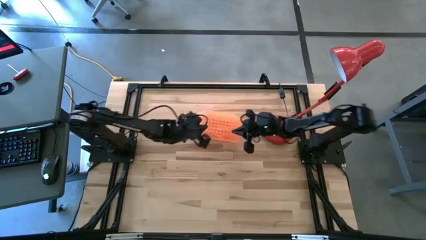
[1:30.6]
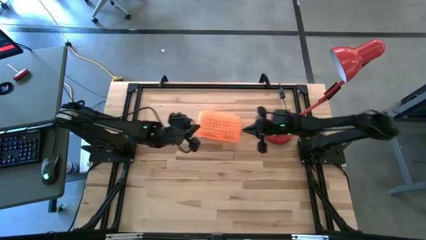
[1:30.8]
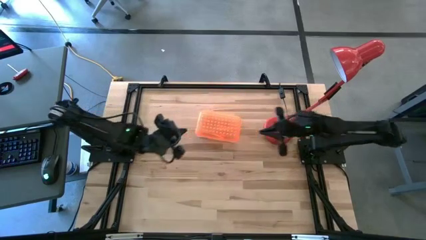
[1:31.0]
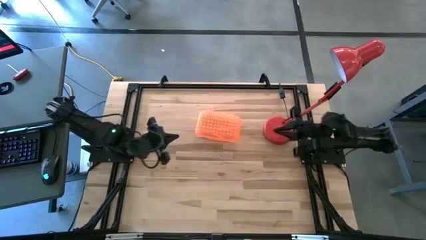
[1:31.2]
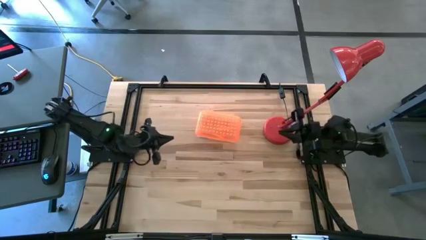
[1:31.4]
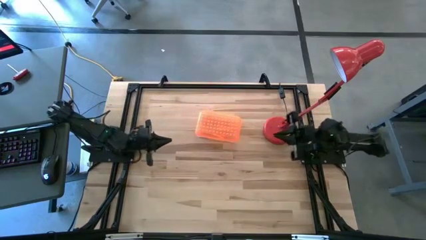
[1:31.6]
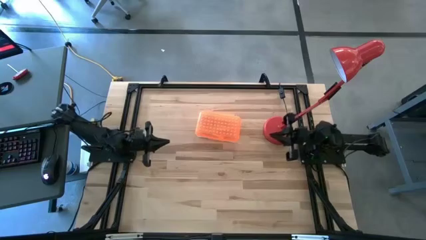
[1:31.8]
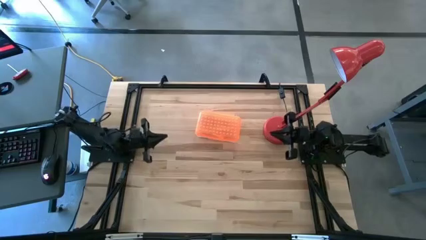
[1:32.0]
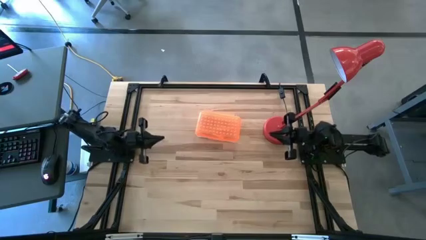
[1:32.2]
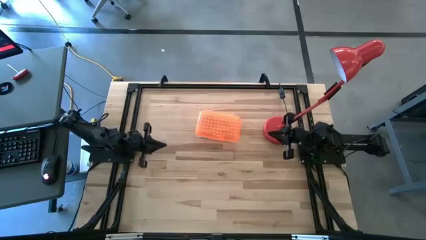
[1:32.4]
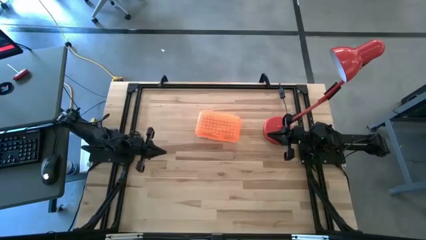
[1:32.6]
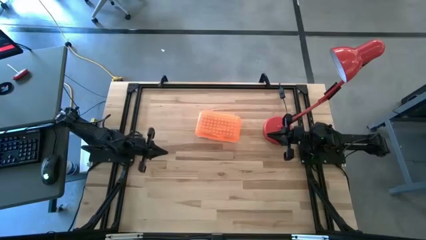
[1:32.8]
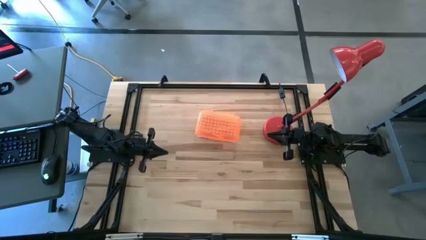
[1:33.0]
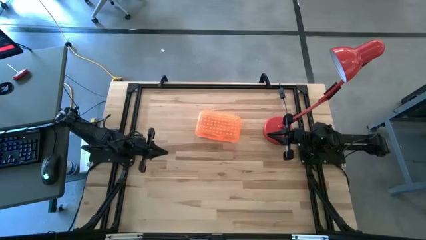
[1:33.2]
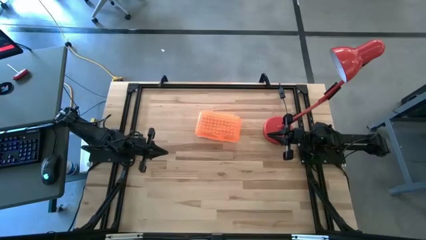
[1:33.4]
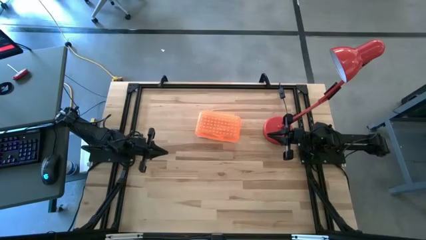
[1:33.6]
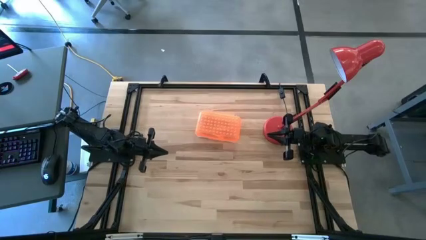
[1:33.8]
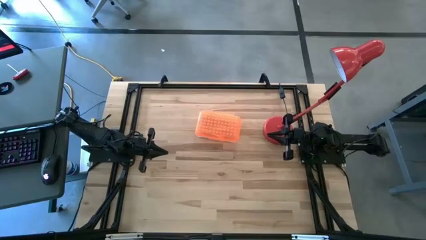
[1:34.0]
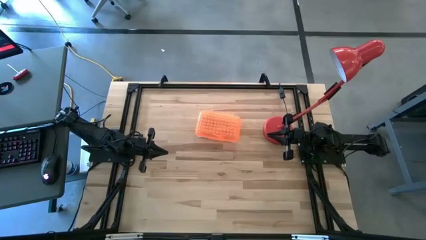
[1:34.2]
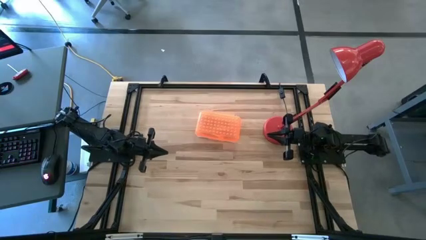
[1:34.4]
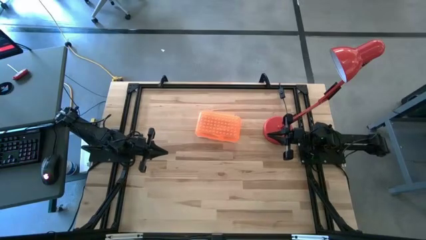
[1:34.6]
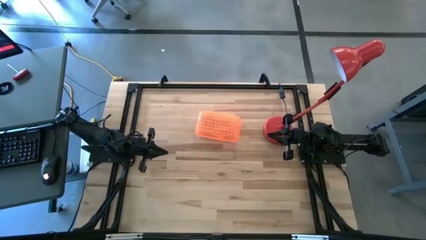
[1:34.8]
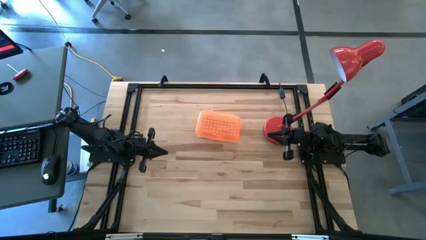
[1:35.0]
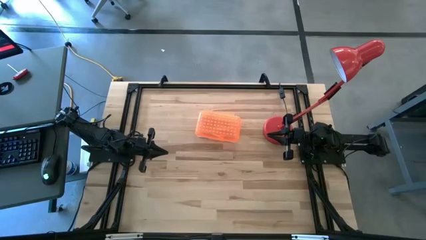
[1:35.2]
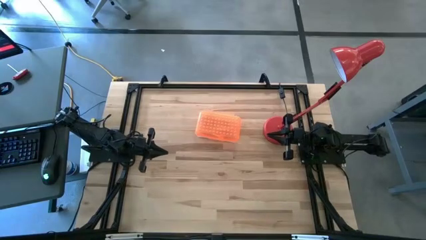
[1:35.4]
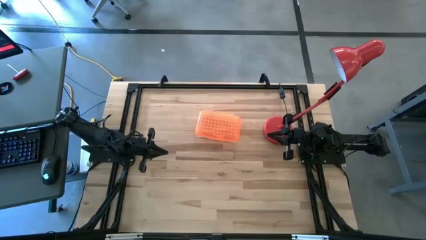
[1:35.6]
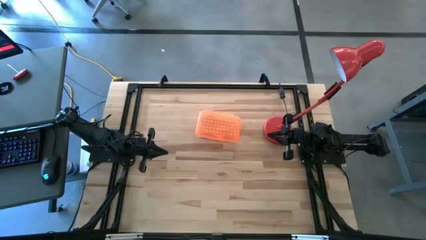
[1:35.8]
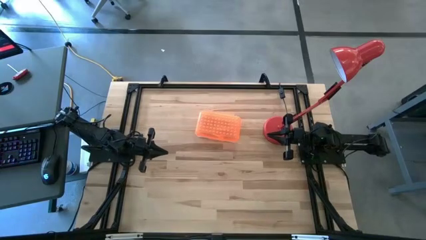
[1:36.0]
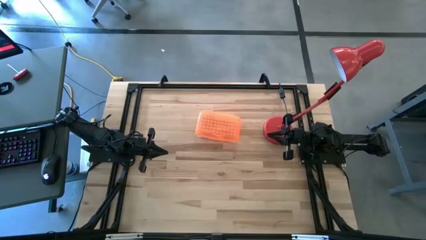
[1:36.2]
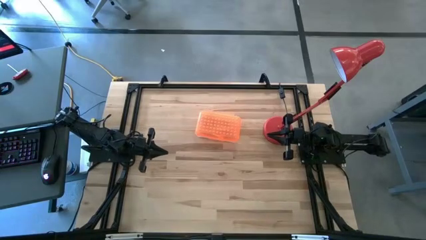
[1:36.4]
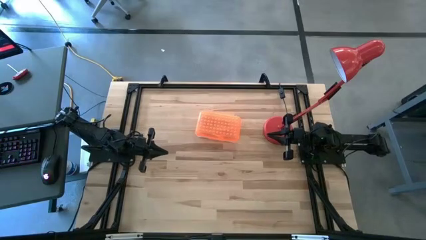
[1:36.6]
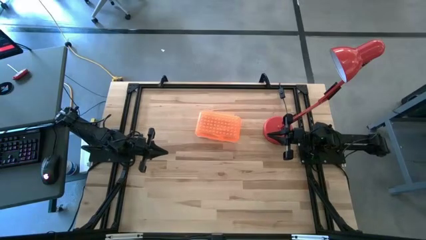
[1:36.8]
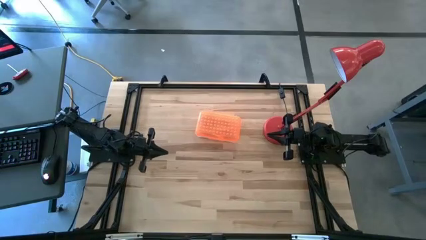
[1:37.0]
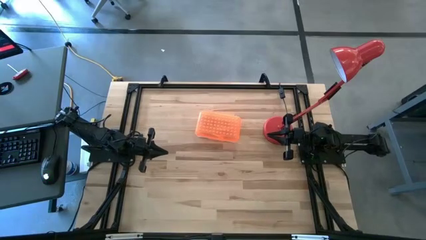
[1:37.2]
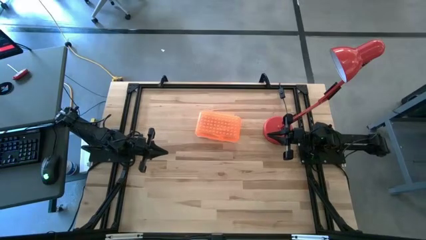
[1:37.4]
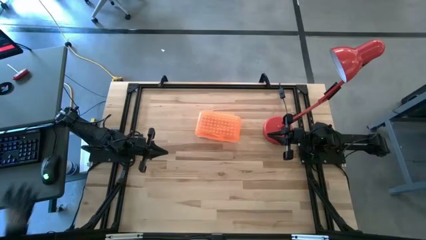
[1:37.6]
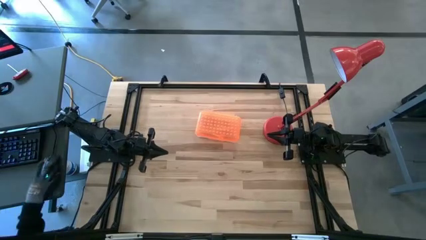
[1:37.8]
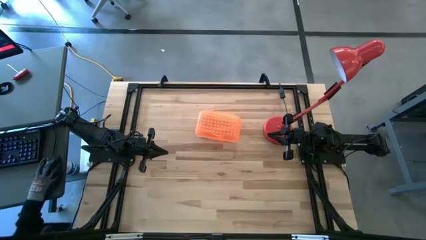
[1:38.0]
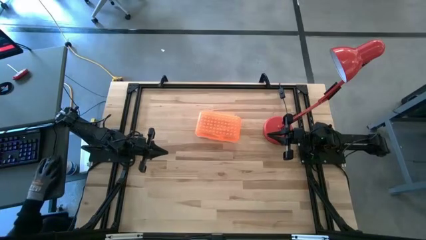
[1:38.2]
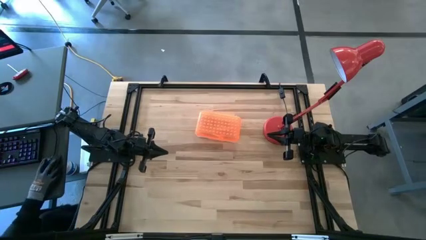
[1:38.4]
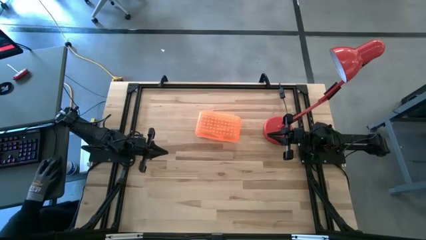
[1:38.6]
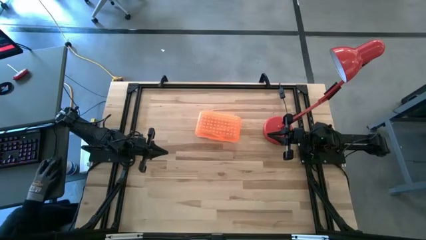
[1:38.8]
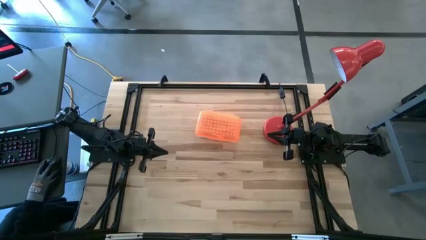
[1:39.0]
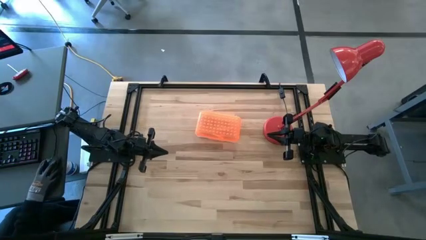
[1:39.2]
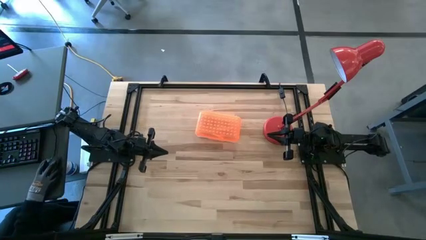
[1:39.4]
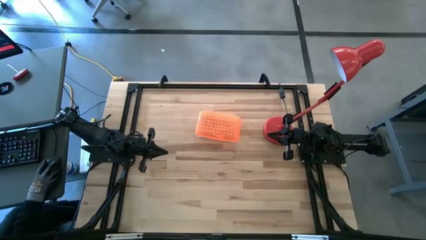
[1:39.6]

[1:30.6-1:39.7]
Task: Pick & place school supplies into a supply box
Return to Home Position

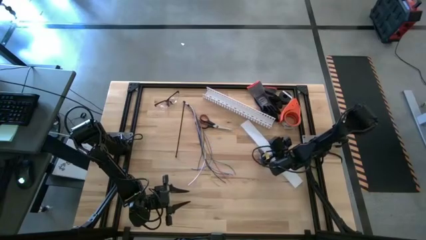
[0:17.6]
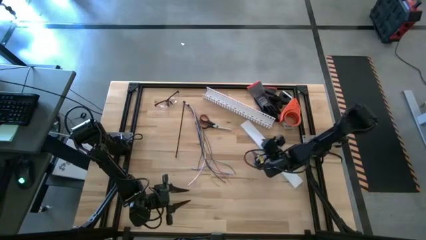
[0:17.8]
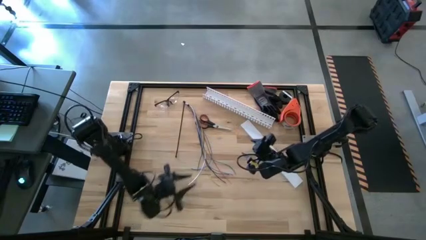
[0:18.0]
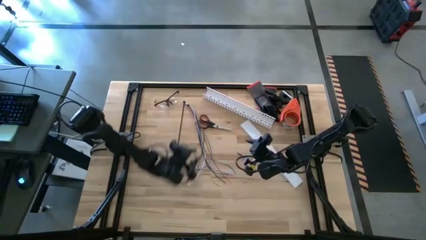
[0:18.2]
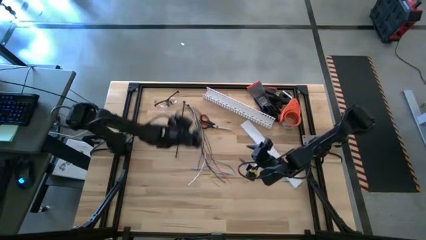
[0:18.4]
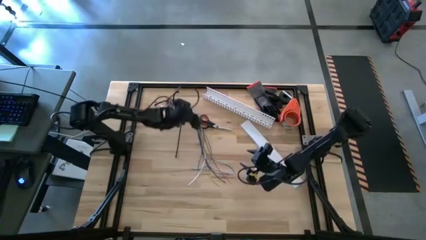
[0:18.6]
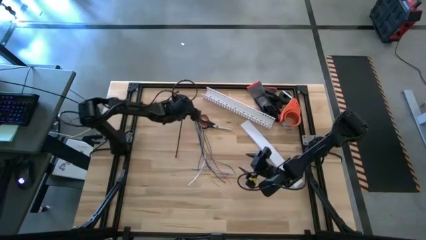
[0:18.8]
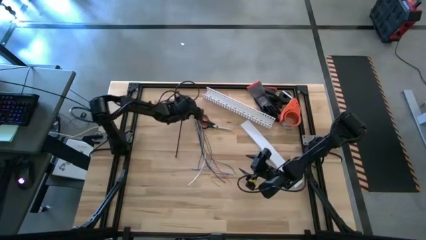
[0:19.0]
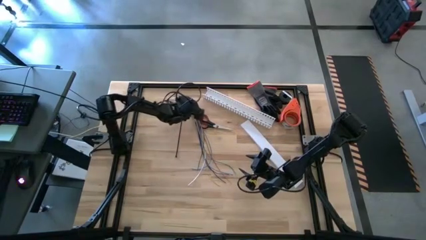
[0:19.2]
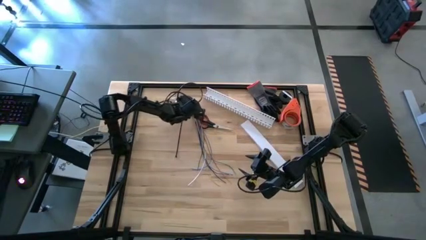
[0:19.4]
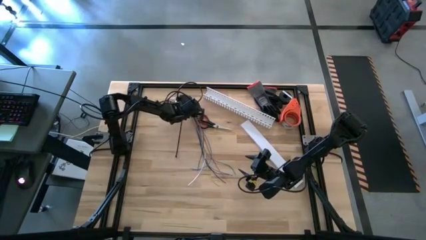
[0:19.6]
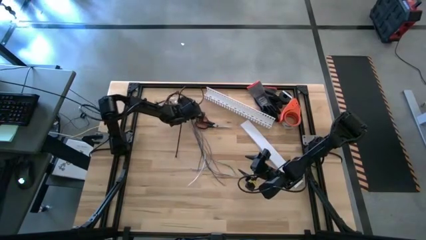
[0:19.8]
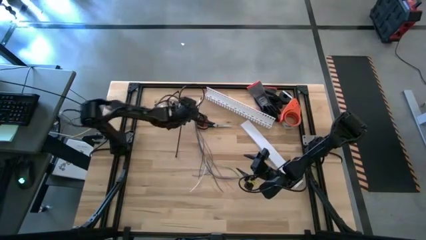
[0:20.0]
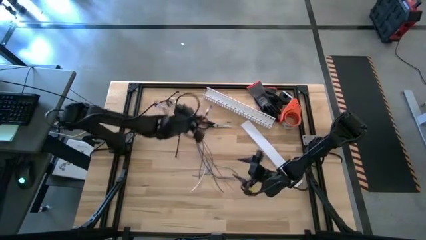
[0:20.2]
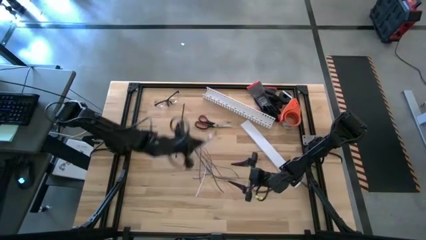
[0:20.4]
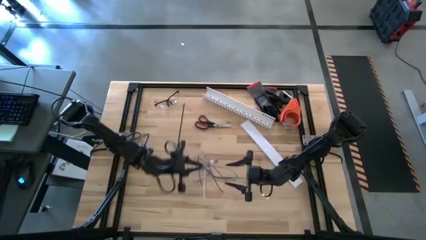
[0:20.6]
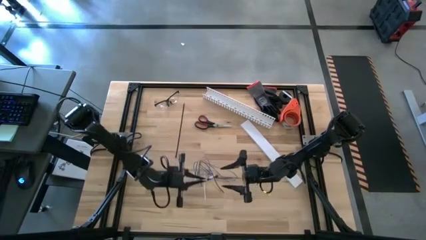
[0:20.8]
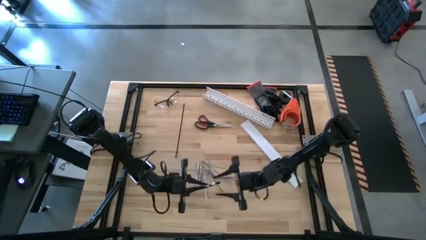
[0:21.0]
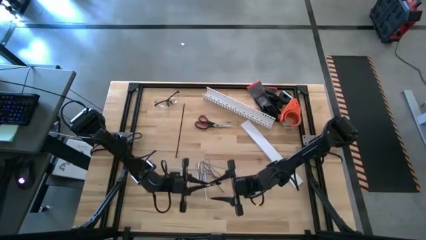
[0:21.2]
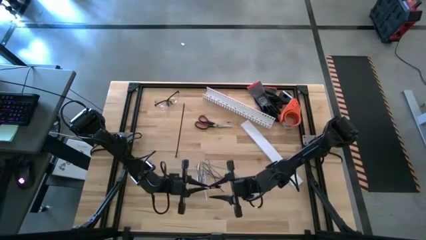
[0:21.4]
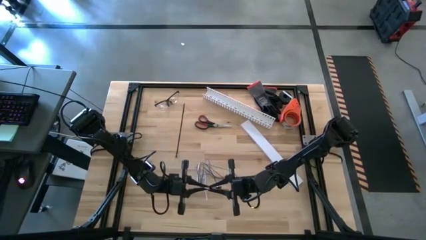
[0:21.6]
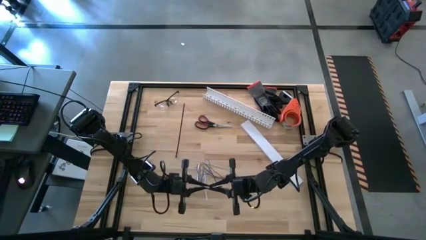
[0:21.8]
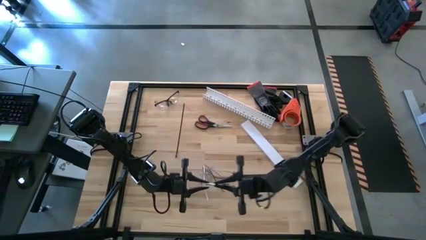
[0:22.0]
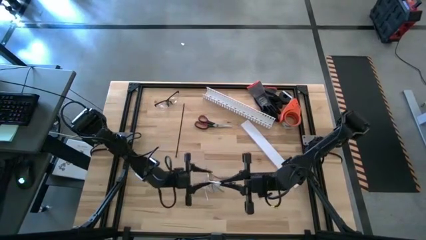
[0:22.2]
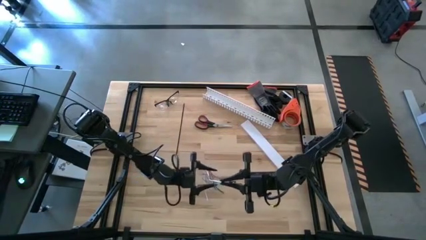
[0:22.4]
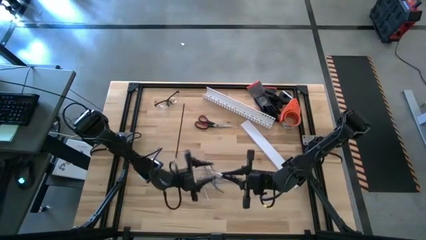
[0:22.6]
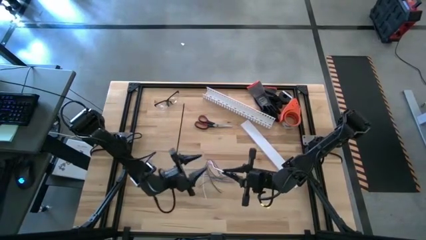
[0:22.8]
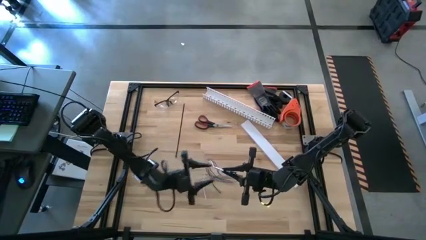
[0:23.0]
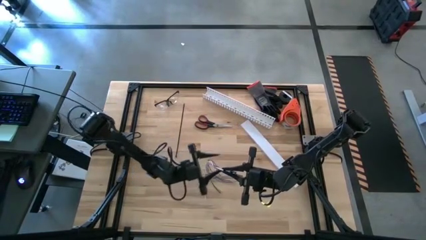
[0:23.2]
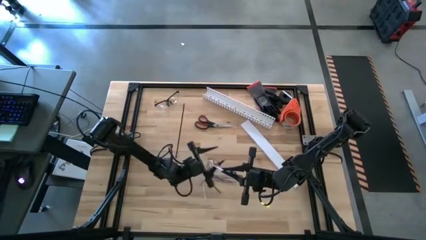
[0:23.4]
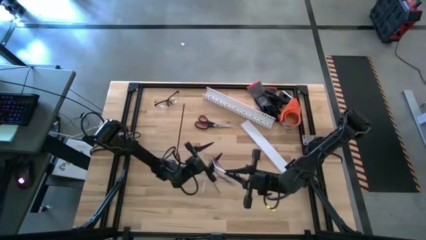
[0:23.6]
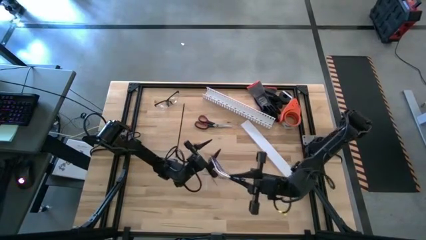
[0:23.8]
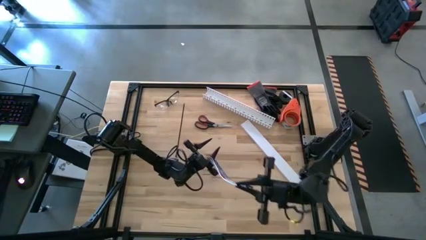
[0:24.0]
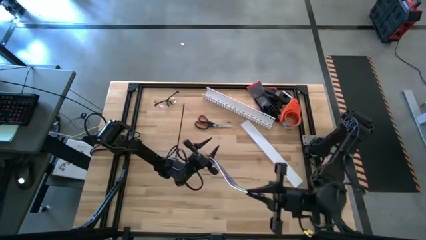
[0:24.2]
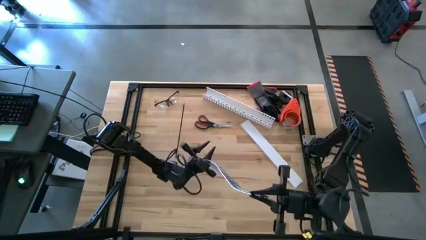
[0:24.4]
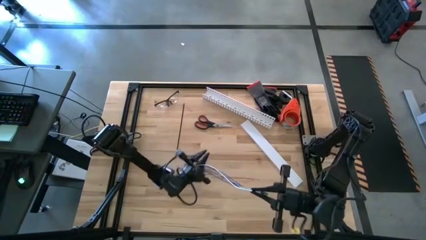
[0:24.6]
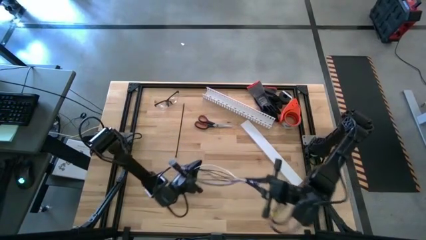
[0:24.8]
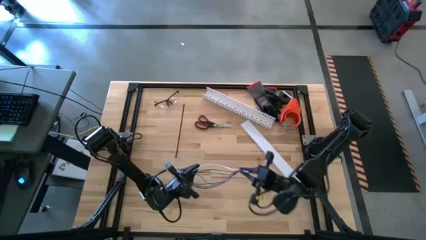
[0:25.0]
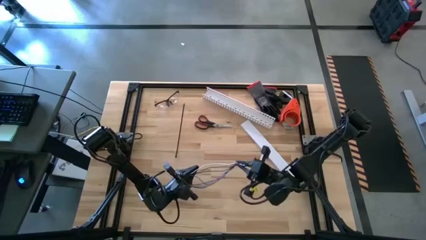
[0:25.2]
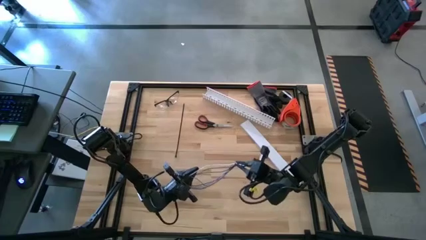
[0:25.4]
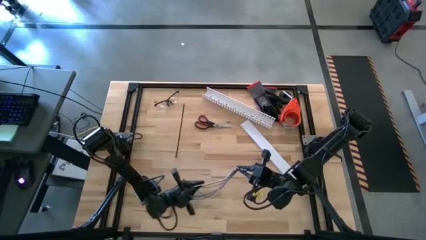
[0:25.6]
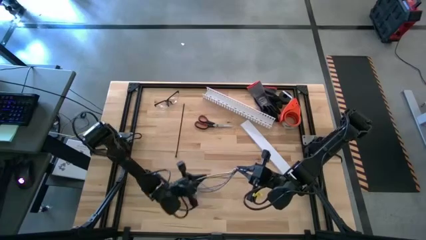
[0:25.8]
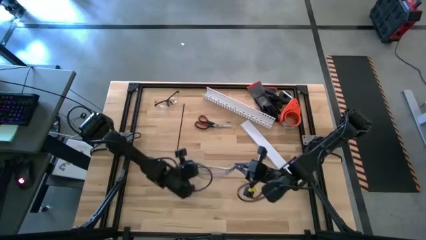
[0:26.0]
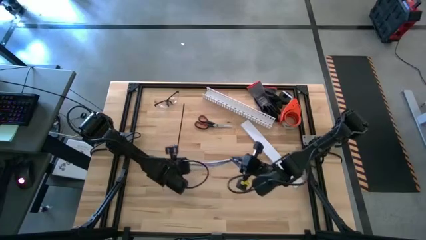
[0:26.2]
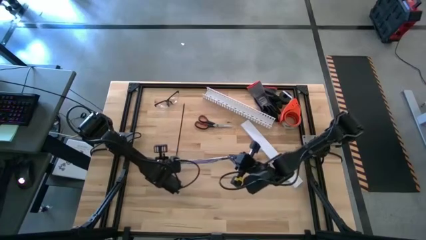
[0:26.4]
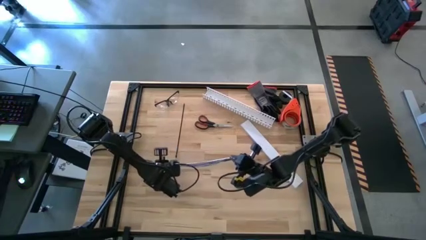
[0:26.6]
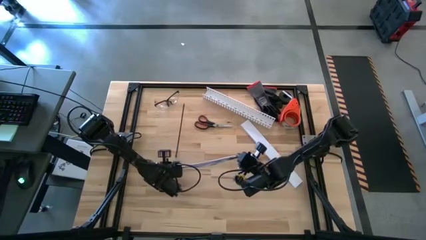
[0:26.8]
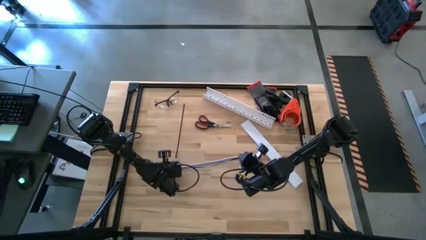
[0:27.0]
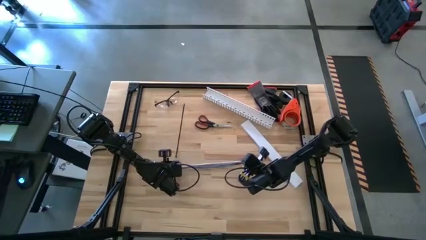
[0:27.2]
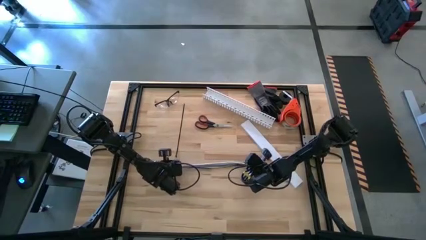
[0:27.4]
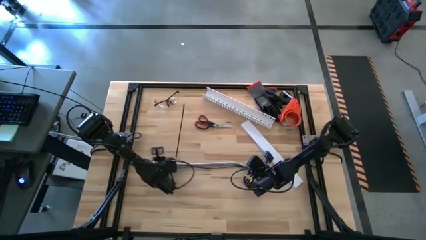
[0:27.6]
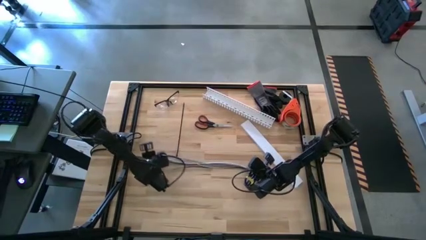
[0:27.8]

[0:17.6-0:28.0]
Task: Ziptie cables
Prepare the cable wires
